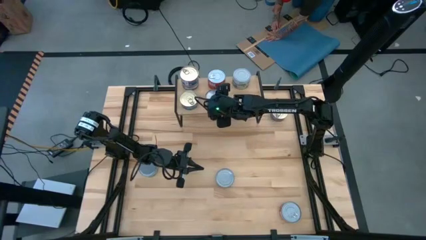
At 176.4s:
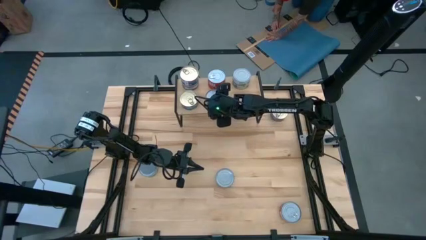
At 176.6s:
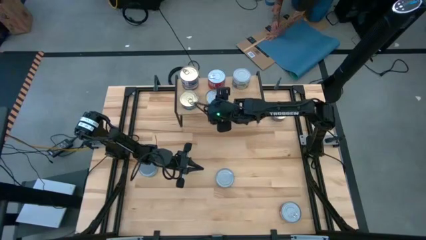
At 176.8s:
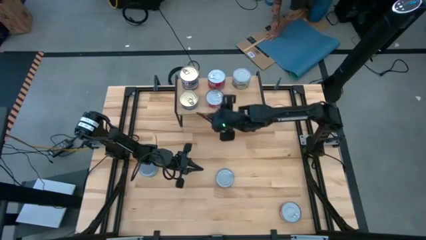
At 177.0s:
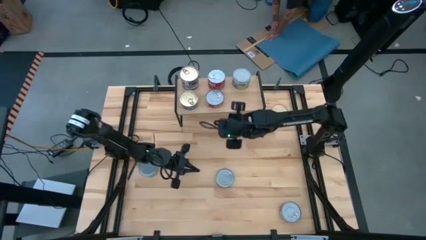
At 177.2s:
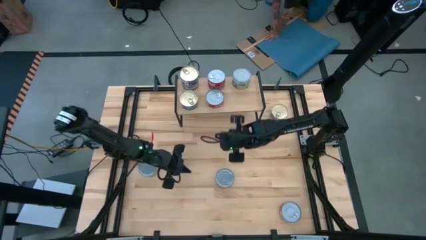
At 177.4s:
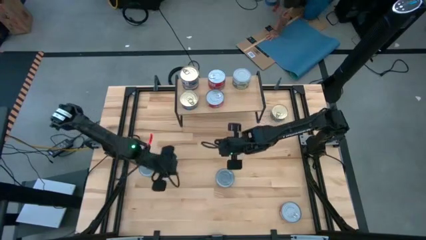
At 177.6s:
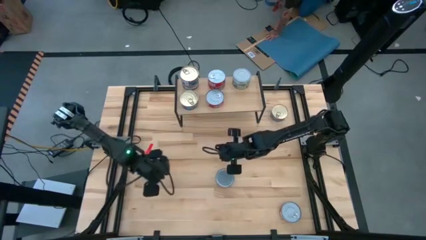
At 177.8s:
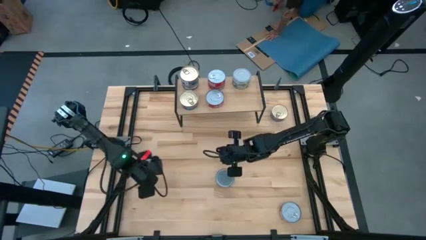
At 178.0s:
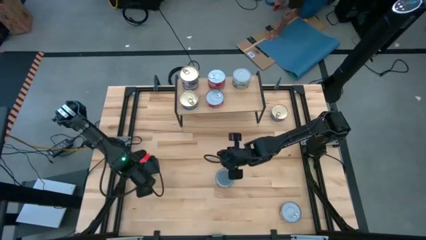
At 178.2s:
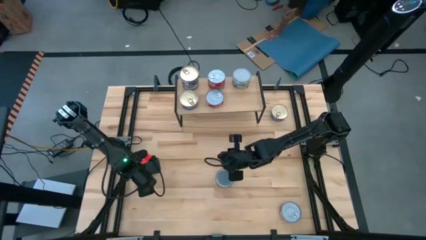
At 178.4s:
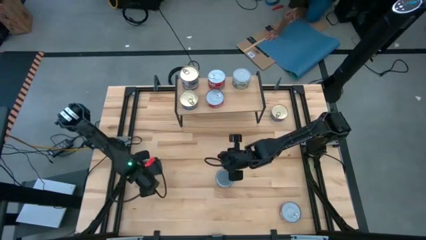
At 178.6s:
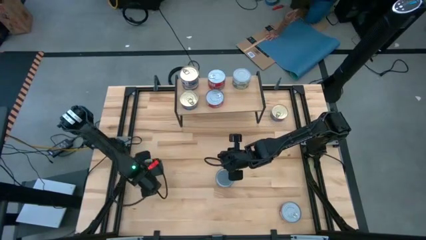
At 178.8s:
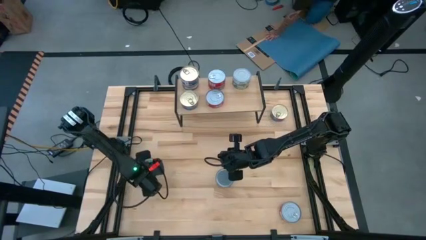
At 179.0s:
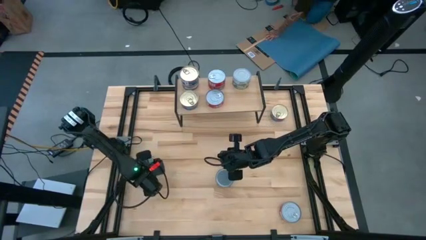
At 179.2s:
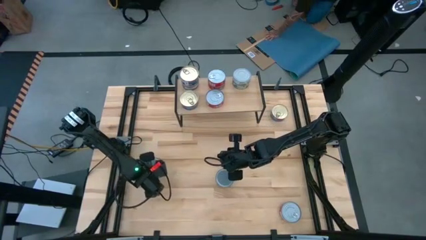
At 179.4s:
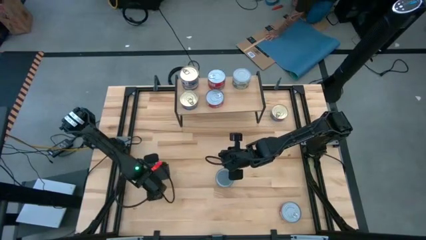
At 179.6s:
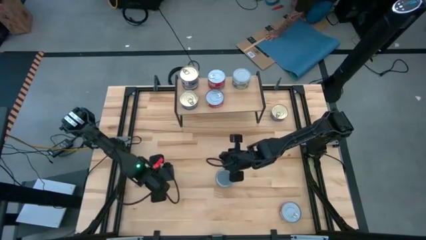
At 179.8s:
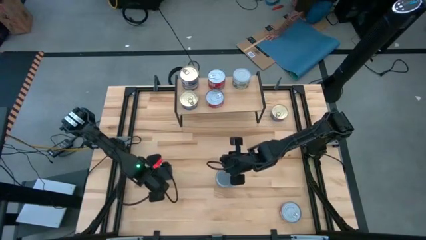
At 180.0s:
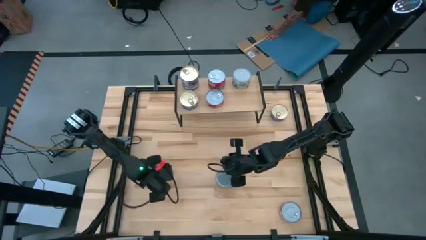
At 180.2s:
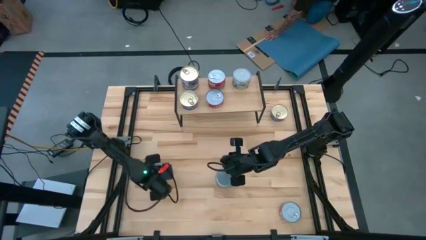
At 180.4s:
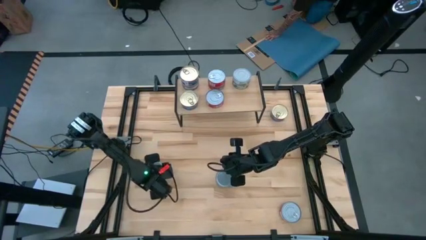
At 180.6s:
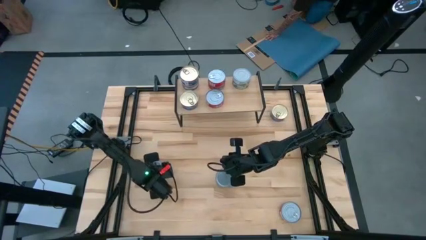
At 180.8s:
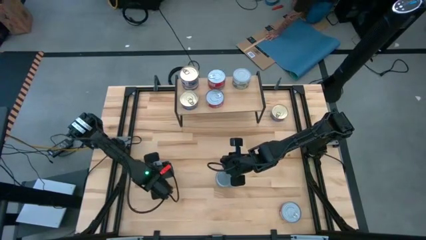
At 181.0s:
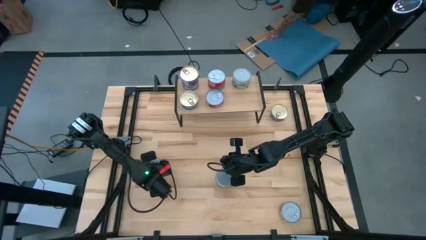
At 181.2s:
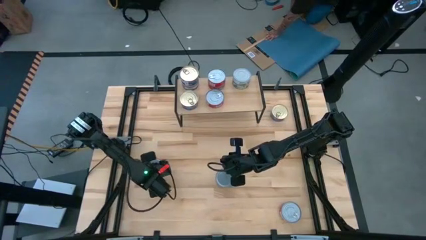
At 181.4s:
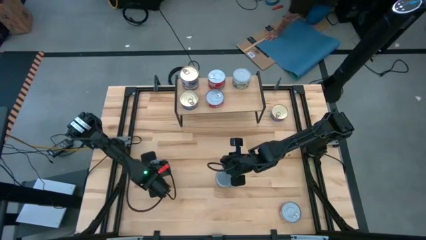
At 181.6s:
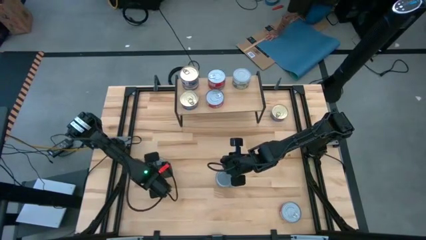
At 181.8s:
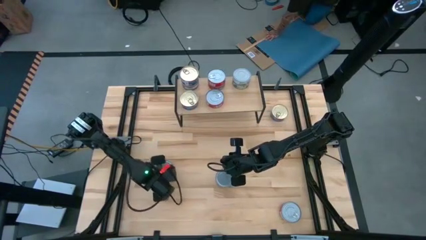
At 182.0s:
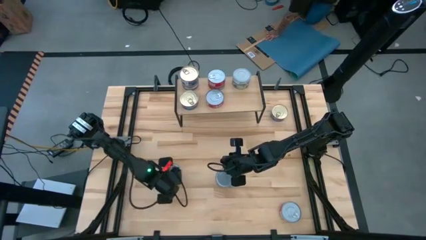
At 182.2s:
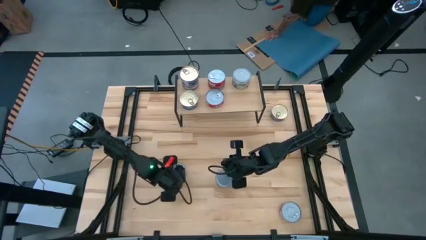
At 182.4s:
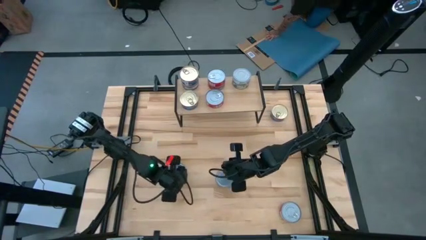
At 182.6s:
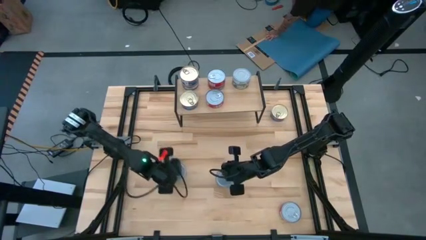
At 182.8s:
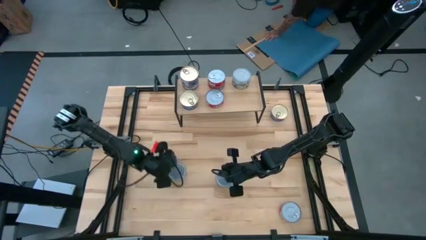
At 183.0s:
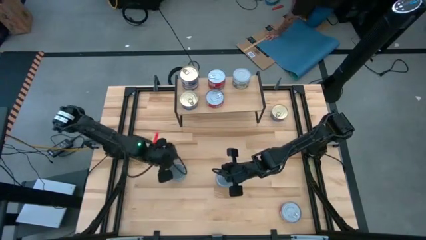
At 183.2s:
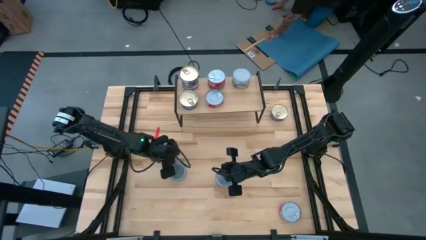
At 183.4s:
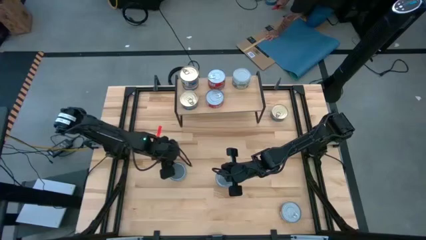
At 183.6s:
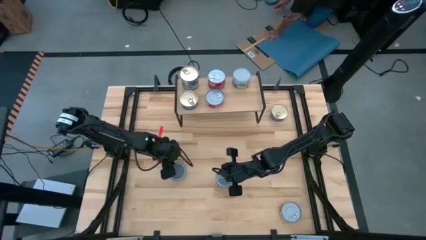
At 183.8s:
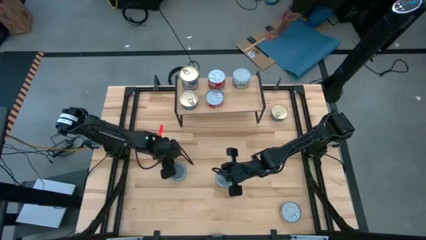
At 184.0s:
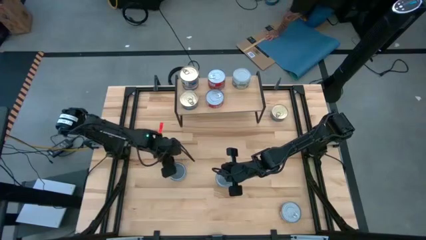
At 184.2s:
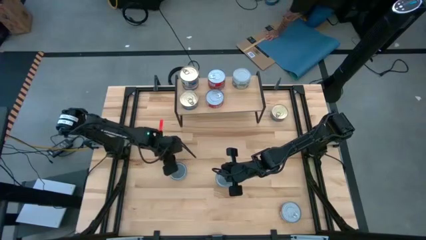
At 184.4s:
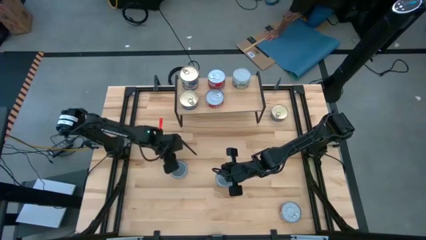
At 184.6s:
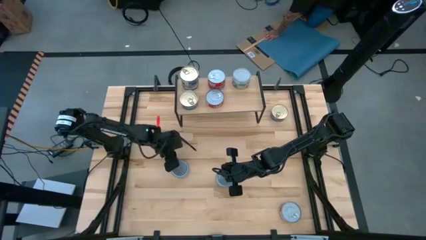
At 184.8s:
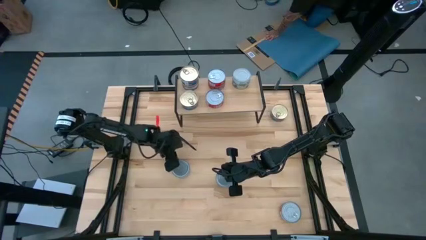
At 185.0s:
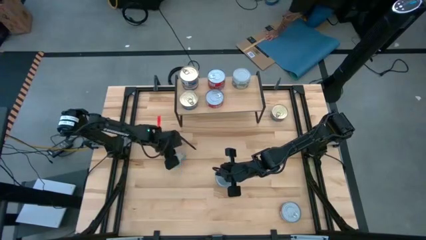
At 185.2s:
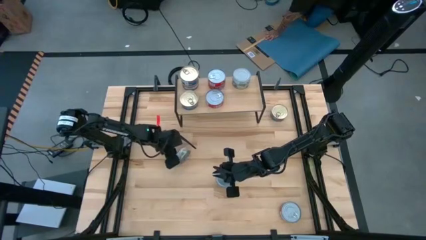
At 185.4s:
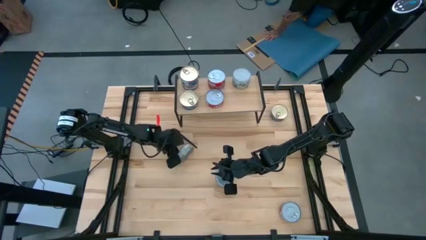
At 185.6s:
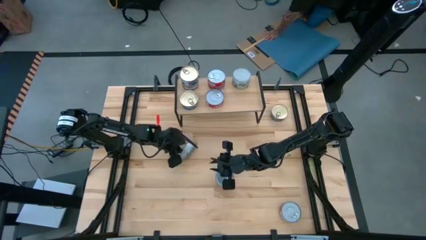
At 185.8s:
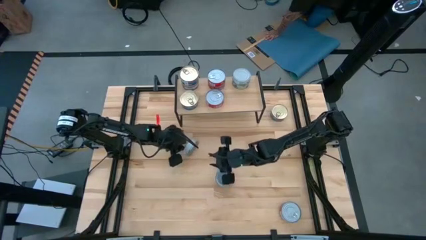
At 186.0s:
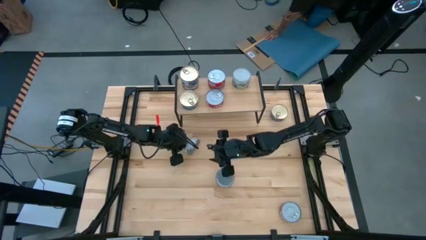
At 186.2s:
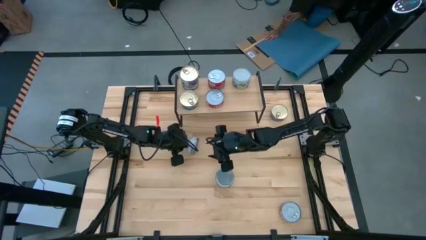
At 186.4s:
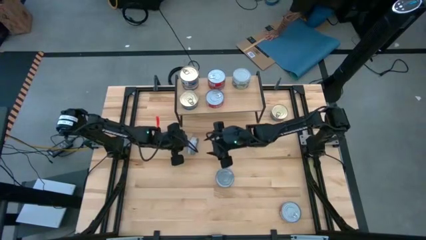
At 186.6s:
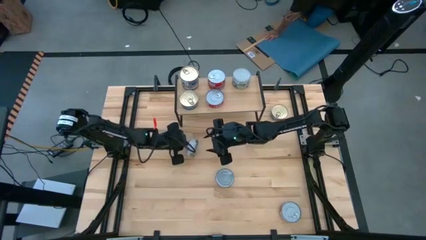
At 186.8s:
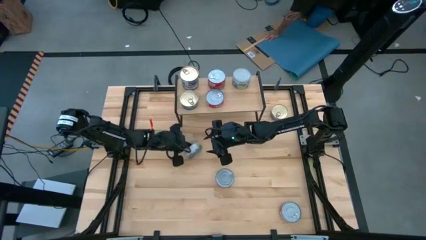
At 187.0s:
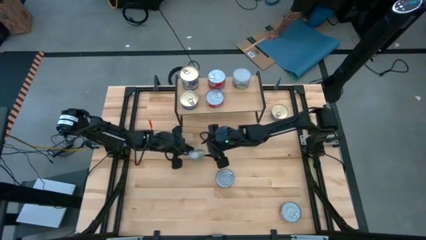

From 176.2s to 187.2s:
Task: Stack canned seafood by type on shelf
Put the green tuna can on the shelf

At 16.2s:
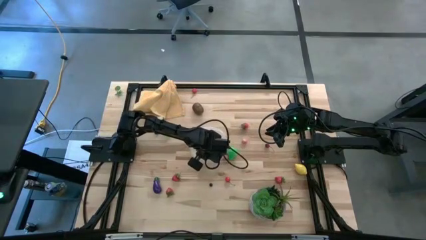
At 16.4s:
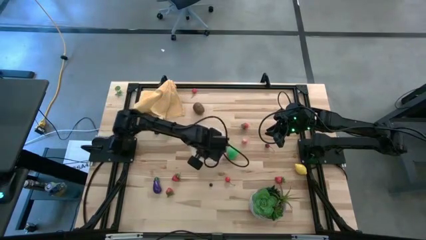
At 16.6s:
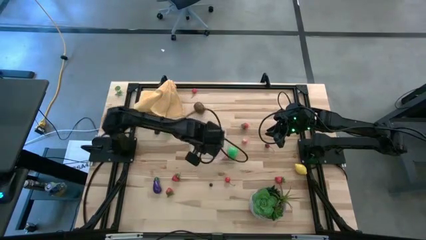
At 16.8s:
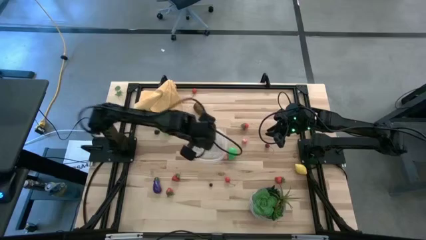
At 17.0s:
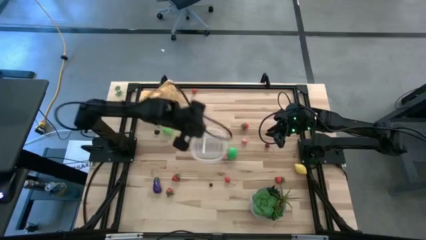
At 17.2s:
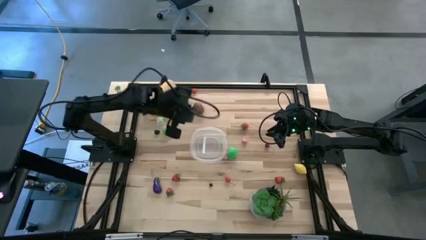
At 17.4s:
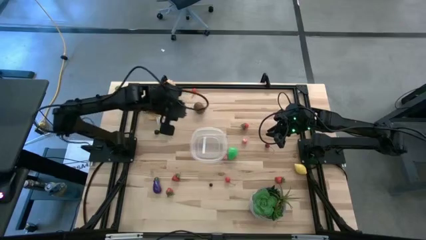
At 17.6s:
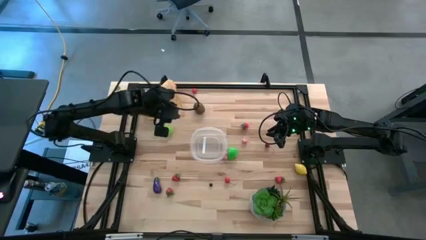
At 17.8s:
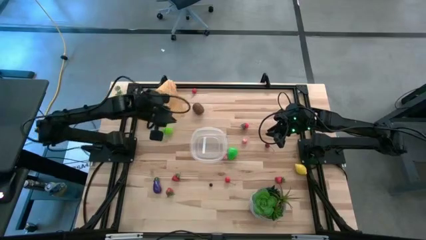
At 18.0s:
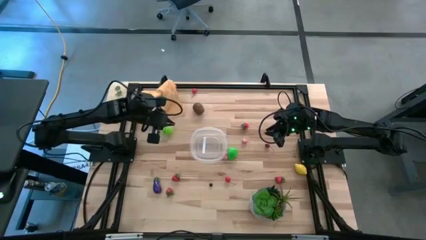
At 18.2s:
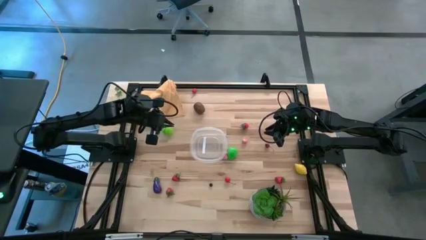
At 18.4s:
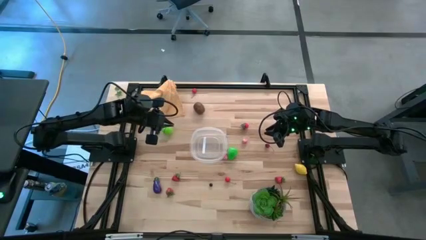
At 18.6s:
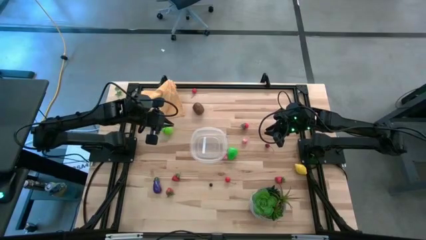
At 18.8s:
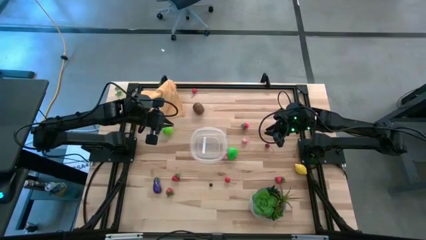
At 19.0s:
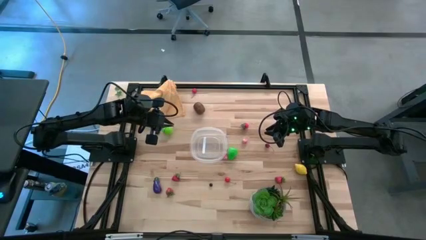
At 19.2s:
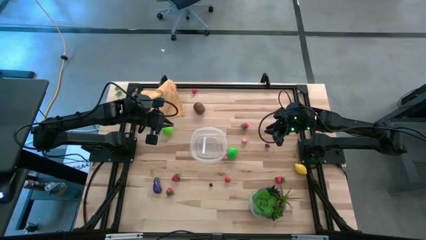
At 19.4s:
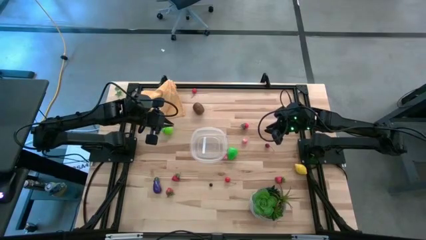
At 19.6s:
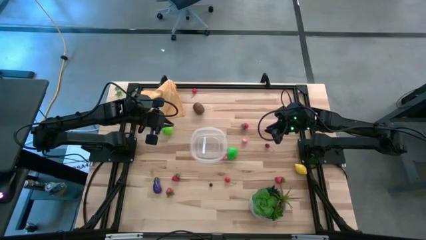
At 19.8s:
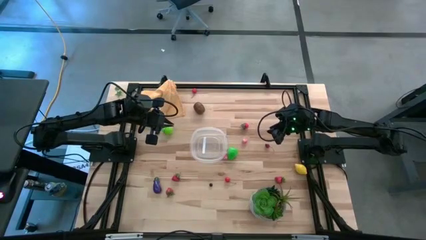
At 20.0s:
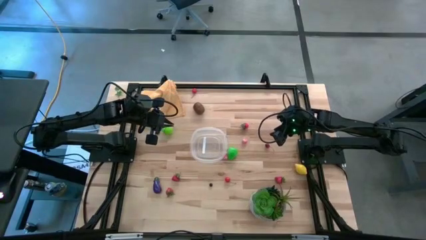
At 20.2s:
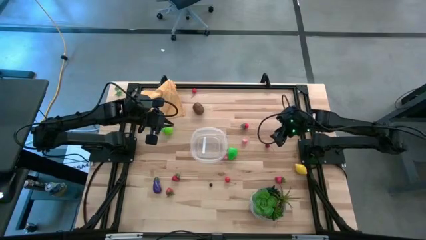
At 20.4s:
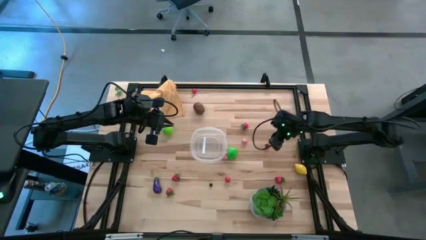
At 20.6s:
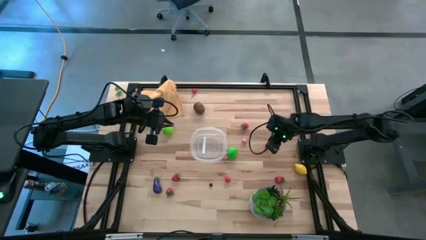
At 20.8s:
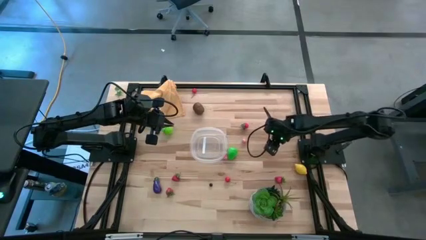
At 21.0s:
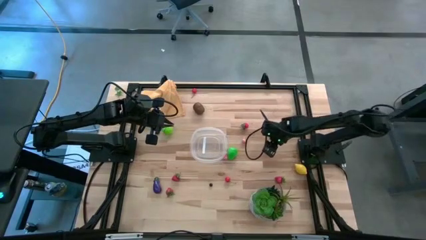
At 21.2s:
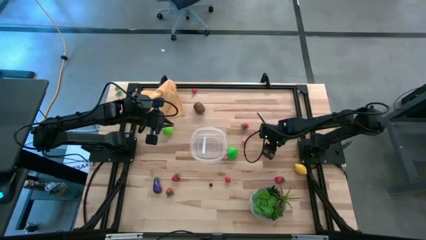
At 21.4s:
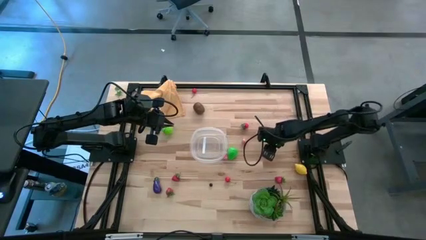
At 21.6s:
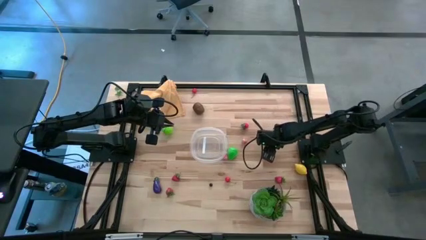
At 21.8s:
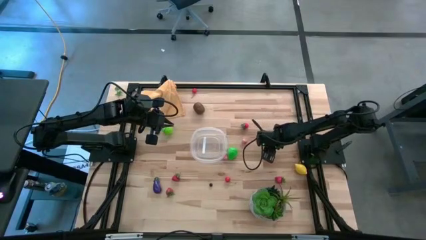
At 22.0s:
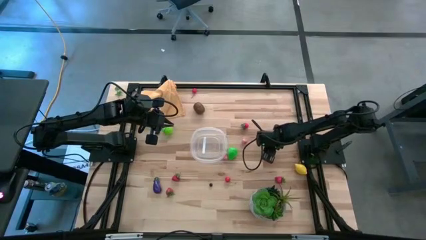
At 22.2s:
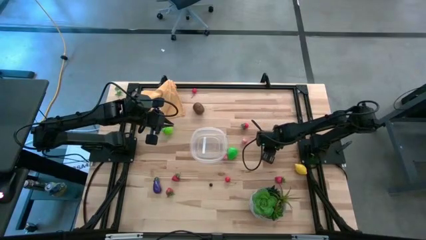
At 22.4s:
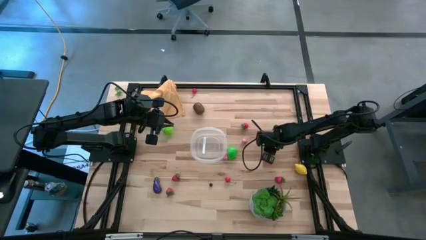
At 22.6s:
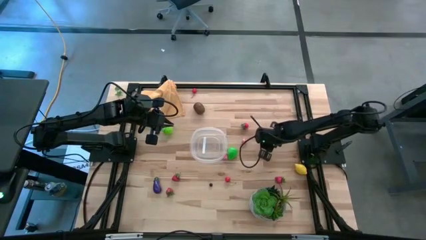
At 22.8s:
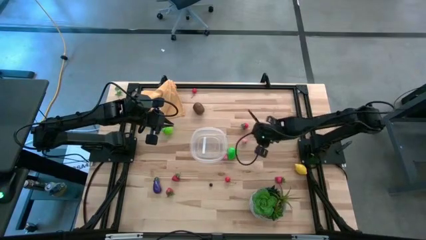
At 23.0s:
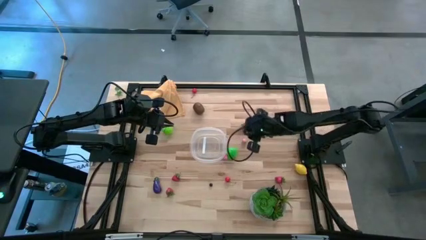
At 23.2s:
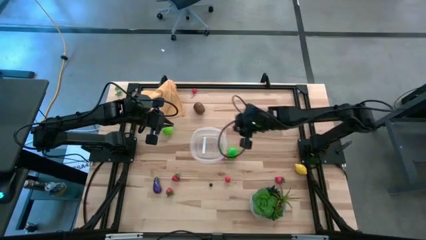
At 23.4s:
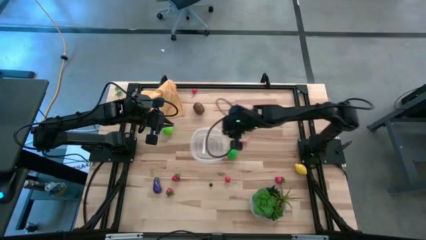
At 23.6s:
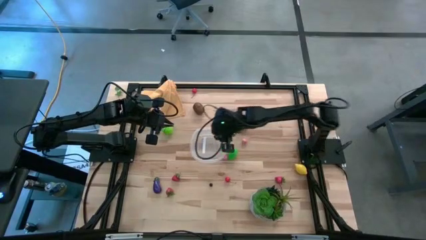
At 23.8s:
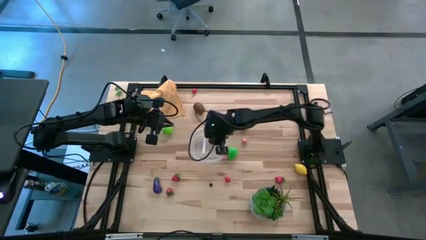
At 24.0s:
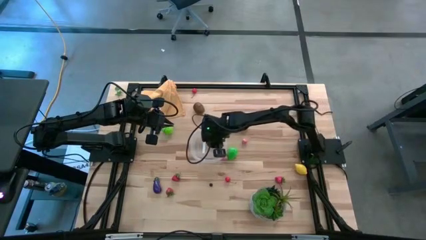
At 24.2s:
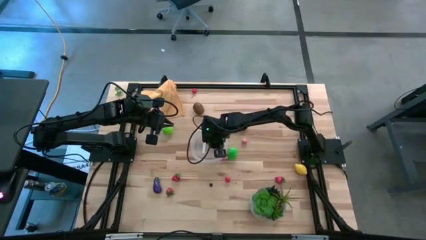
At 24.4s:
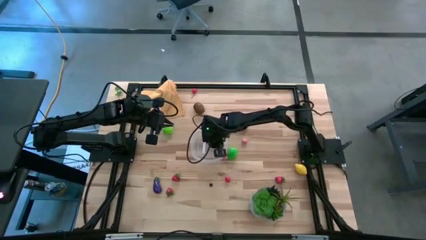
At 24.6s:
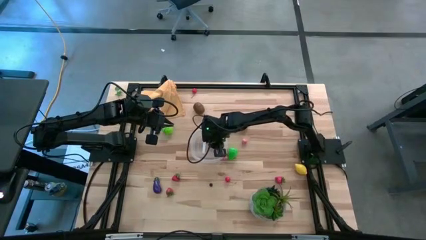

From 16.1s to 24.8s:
Task: Pick and placing Produce into tupperware
Put the middle red cherry into the transparent bin
